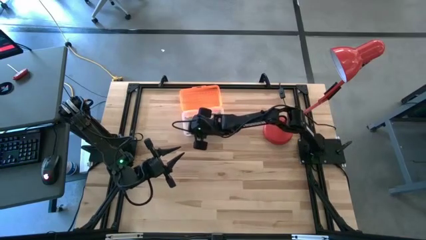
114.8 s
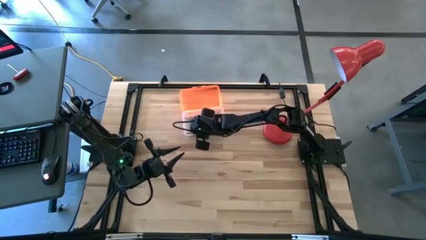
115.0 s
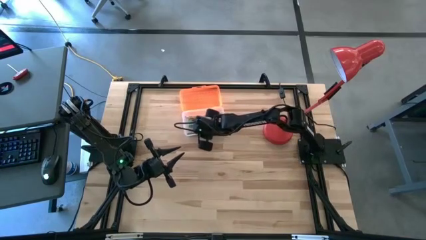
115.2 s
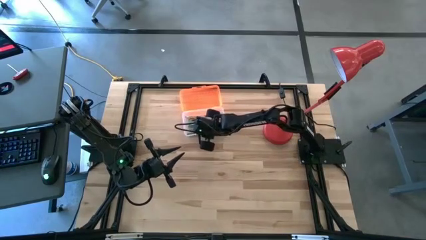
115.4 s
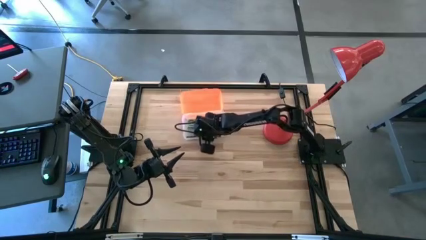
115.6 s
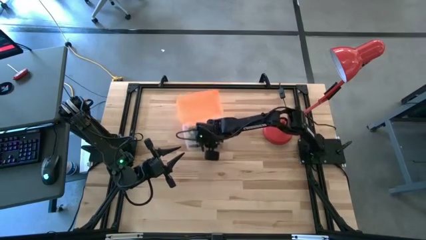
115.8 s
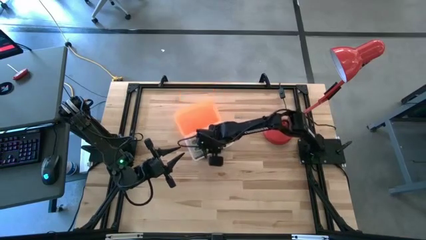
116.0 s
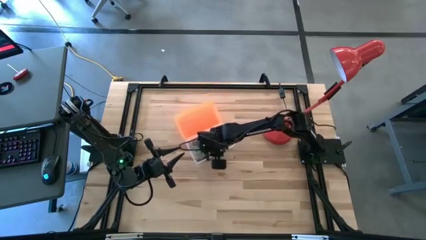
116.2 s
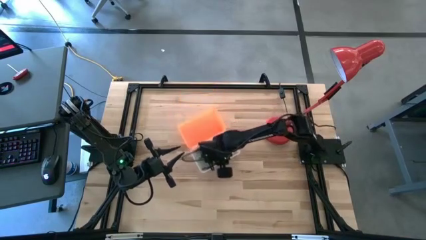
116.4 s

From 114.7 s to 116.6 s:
Task: Pick & place school supplies into a supply box
Move the orange supply box to the center of the table

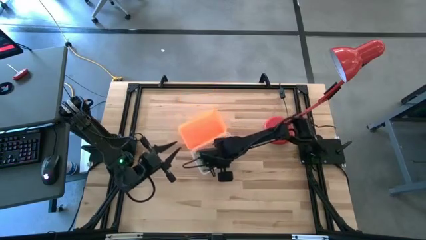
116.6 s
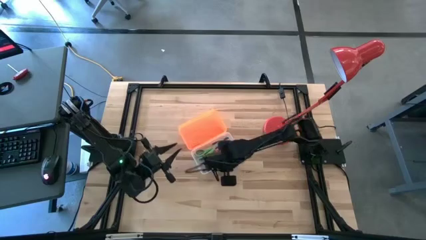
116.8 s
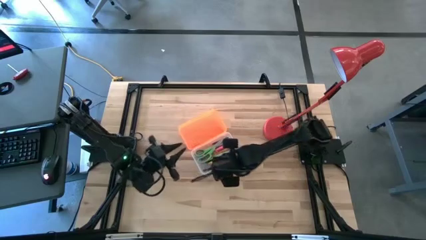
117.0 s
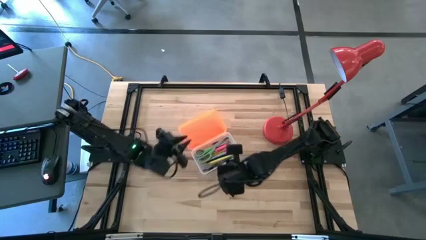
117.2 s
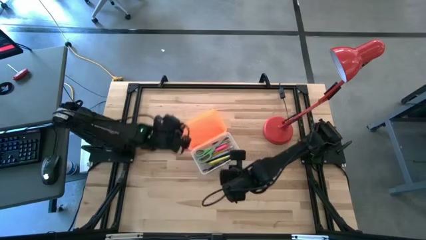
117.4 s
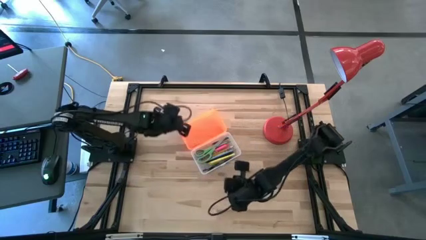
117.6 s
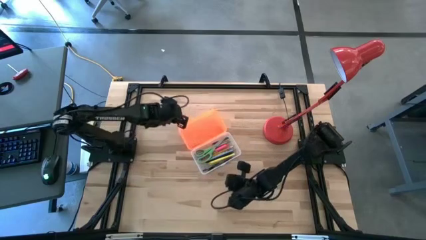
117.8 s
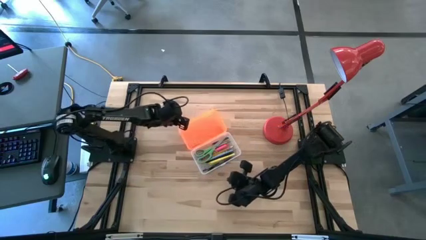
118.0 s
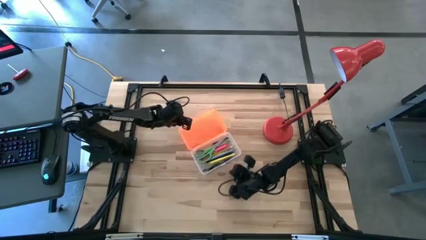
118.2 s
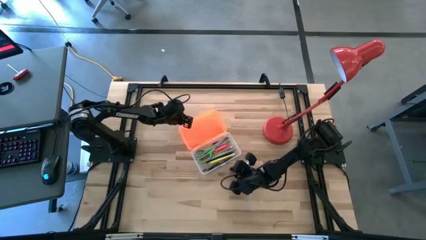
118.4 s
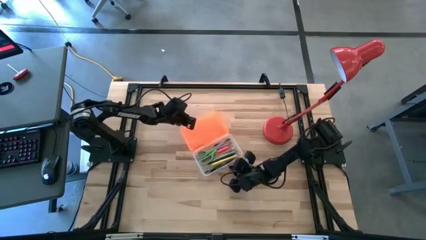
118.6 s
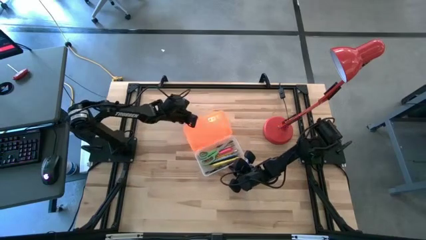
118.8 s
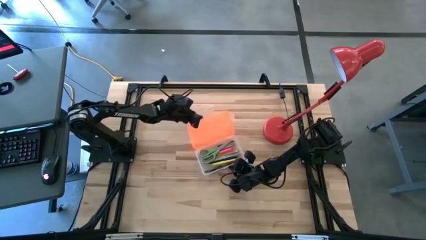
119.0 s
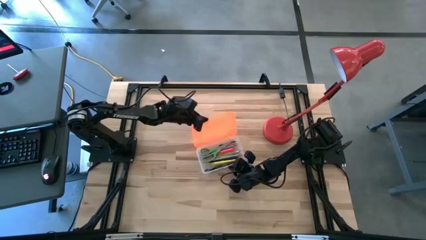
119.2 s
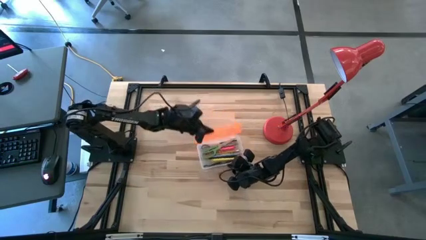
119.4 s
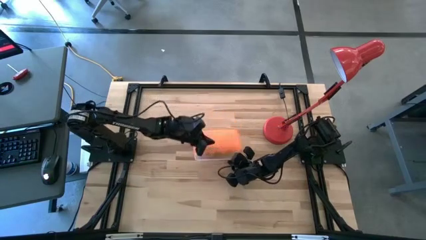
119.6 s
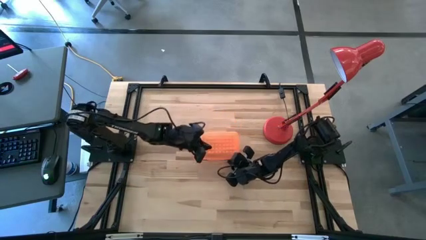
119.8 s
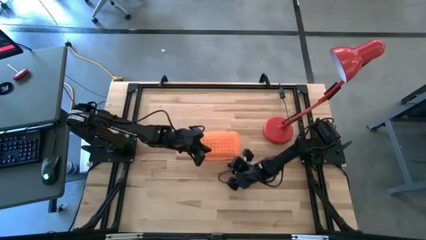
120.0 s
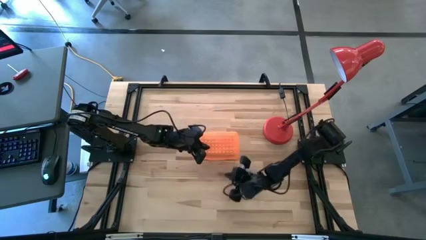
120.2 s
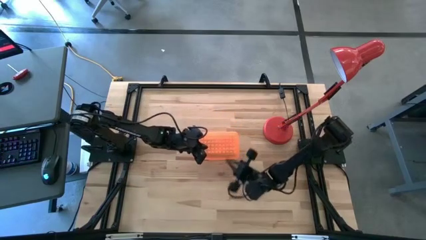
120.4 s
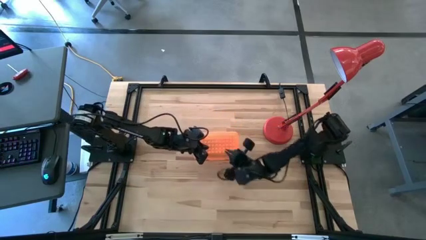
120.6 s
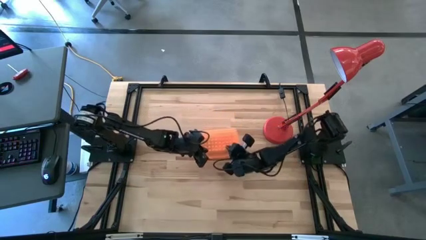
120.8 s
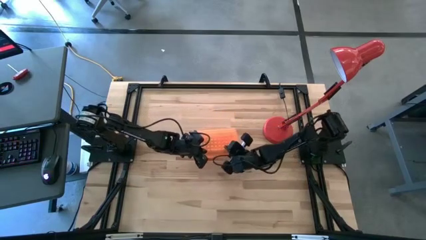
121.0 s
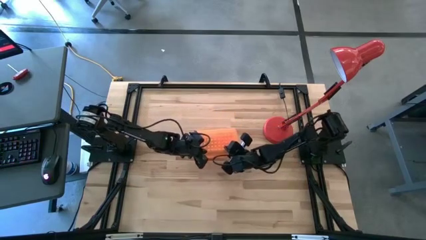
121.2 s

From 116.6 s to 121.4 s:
Close the orange supply box

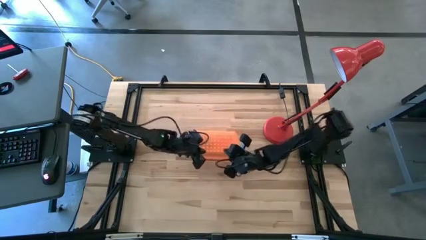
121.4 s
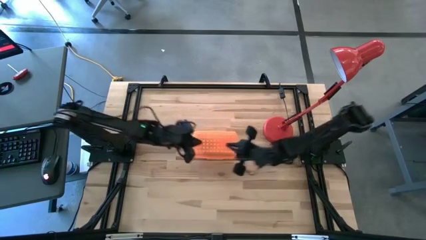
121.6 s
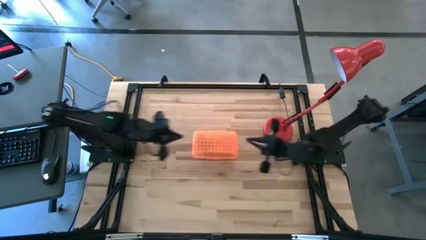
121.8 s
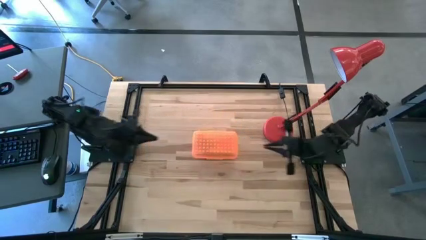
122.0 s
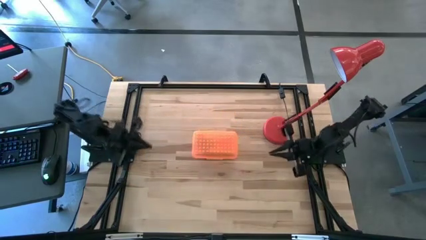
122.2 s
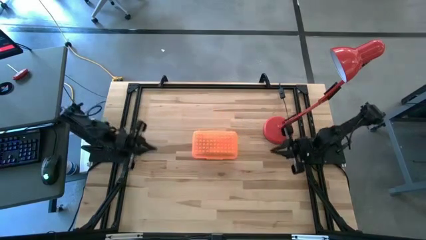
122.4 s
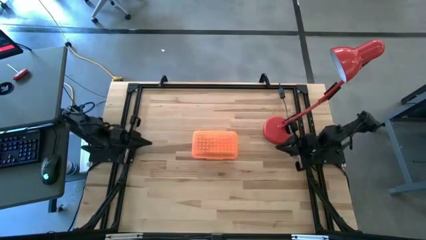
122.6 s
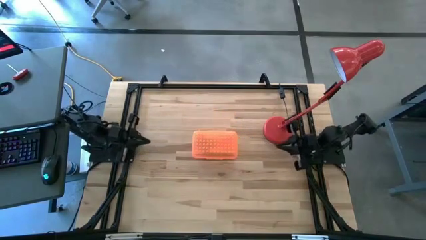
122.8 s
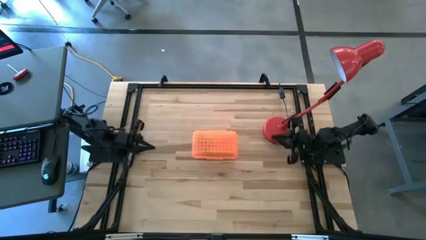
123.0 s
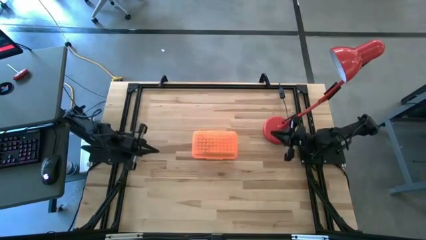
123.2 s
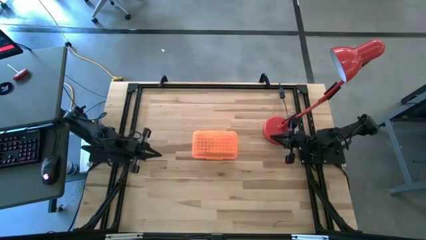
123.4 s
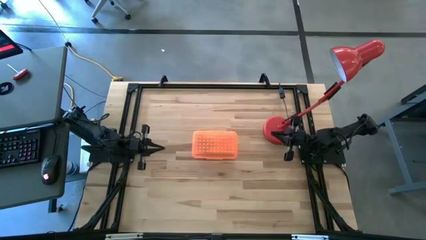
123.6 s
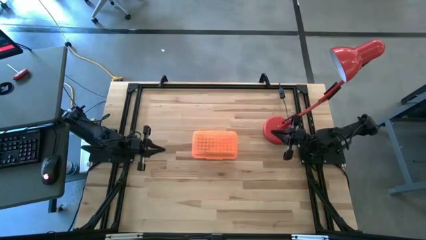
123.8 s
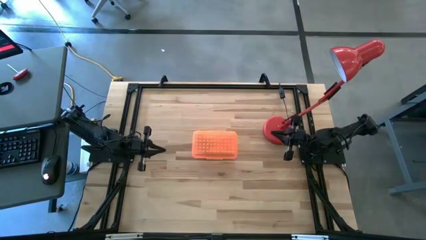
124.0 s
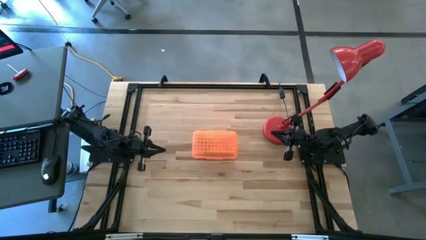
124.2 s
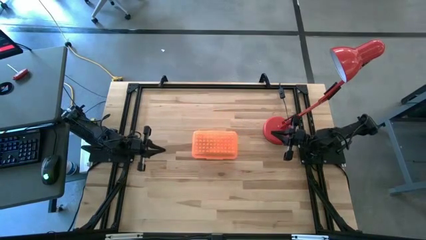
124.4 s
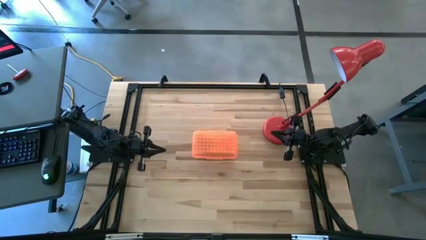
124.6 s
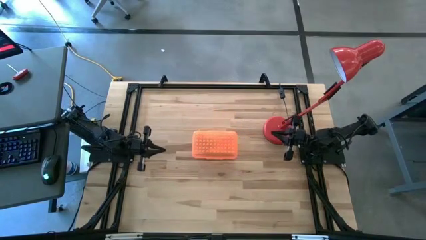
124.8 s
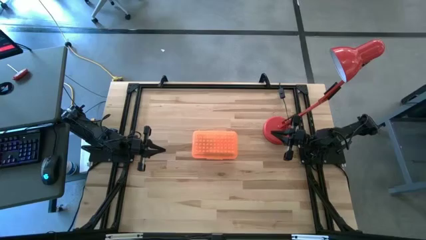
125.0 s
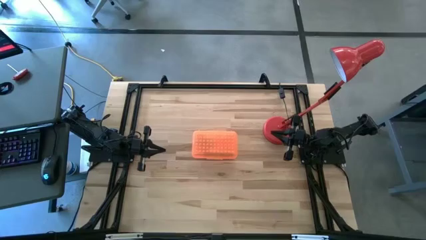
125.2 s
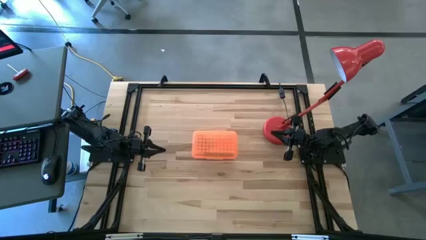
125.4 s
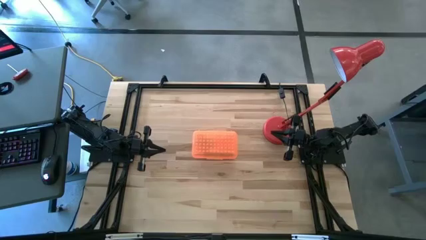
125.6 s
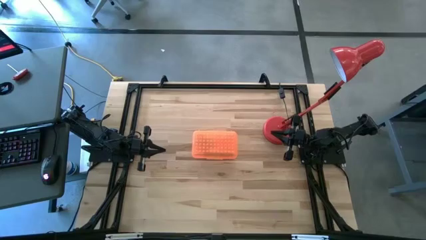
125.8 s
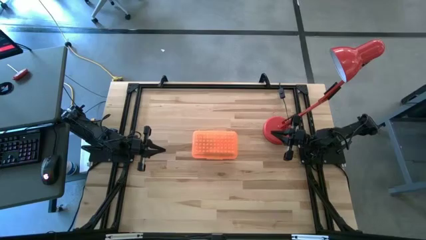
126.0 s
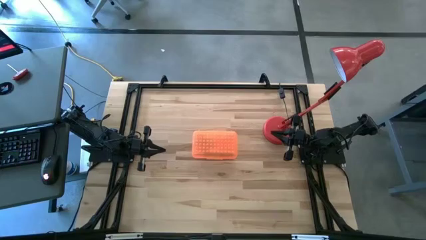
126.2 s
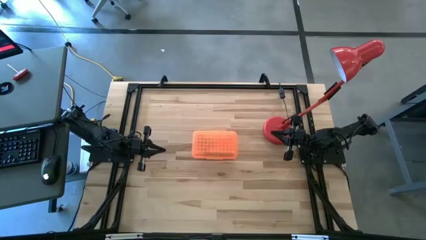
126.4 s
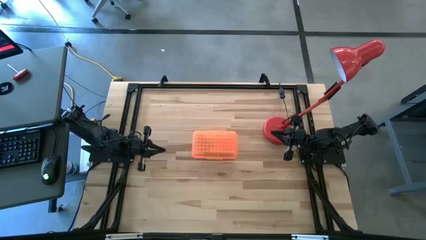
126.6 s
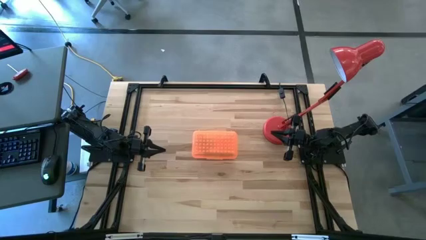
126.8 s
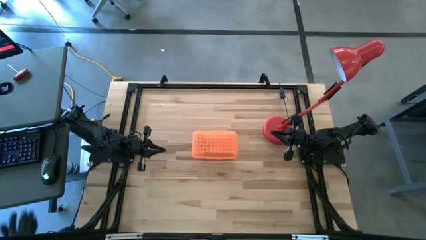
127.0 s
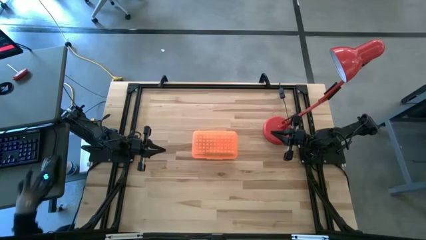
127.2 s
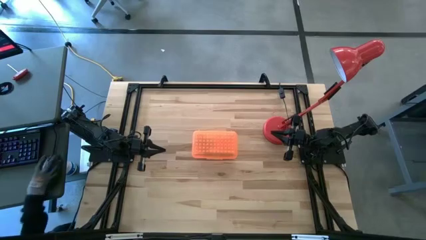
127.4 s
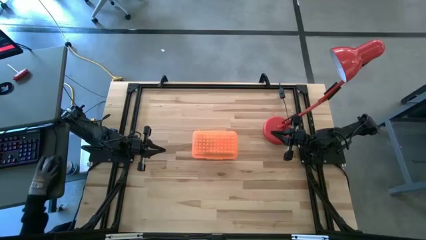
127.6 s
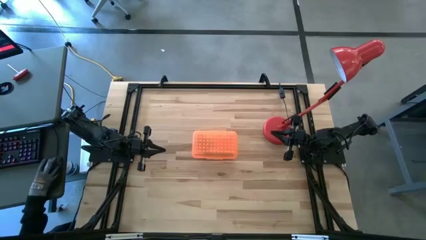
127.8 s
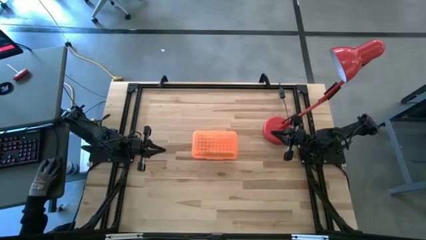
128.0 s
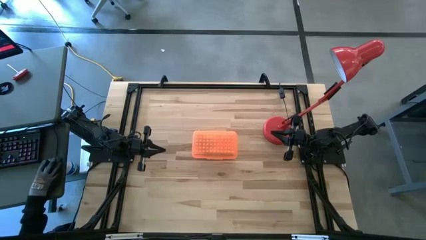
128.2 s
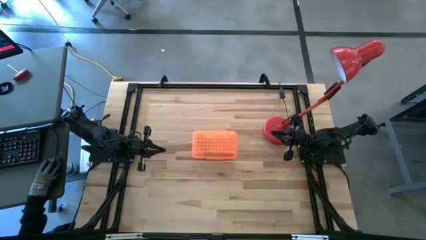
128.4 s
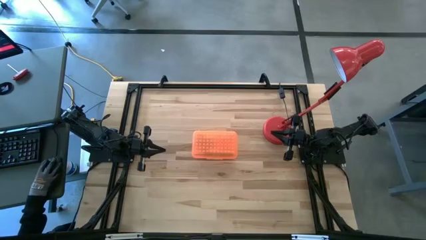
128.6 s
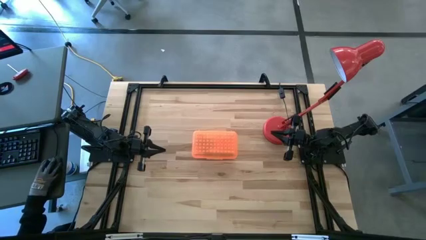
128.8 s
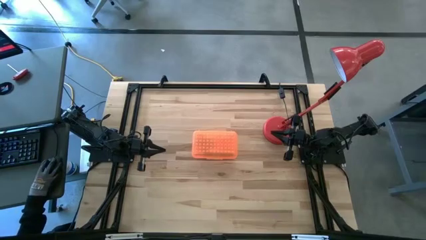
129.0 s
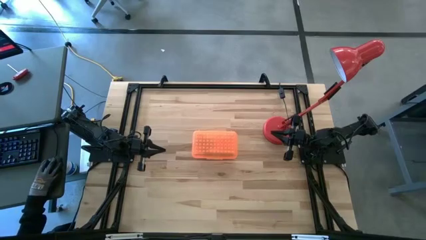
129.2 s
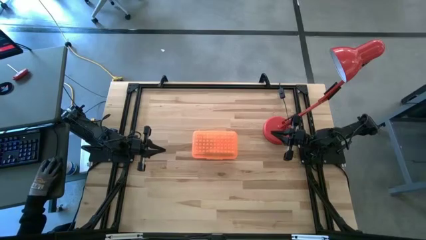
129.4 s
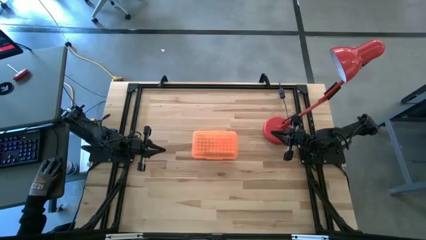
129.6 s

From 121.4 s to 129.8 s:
Return to Home Position
